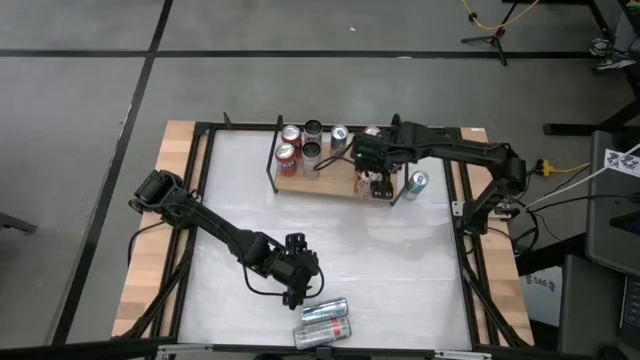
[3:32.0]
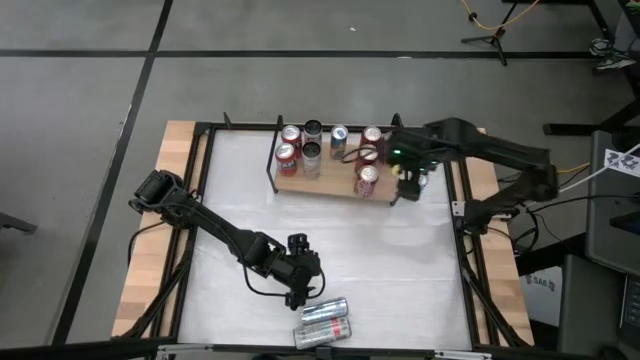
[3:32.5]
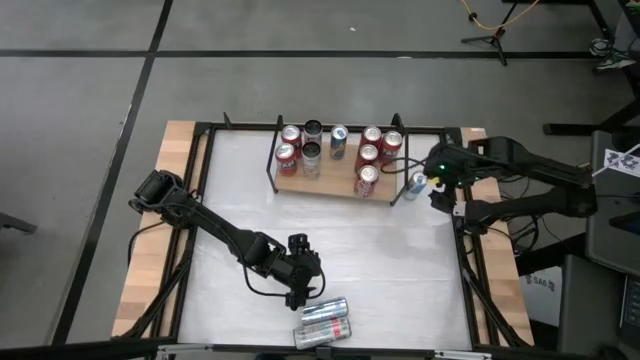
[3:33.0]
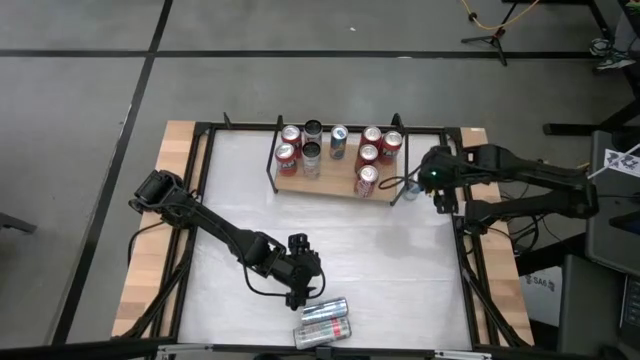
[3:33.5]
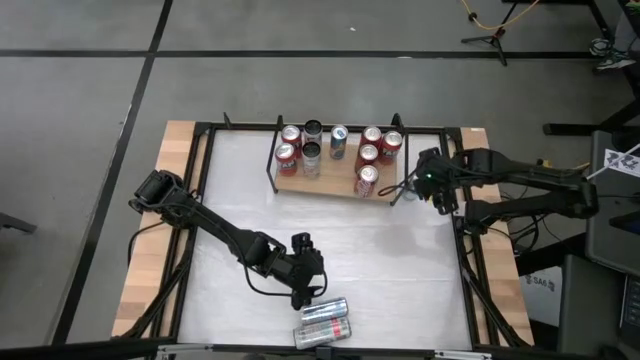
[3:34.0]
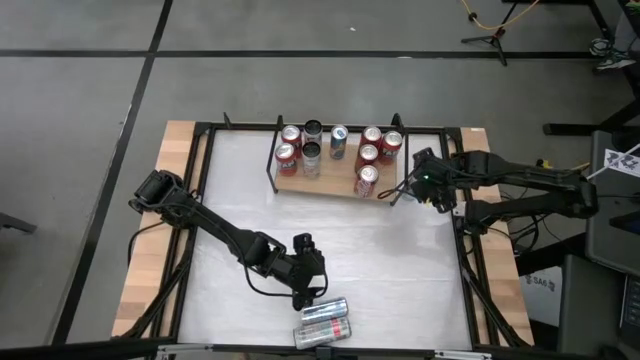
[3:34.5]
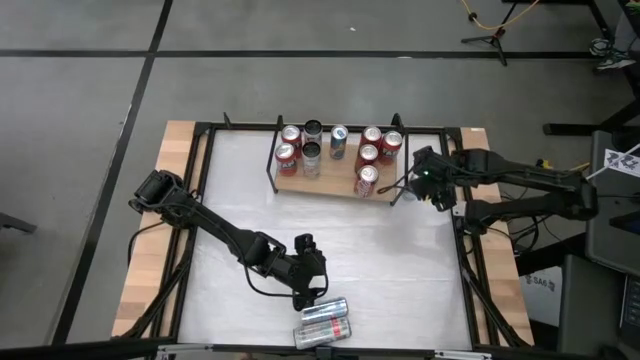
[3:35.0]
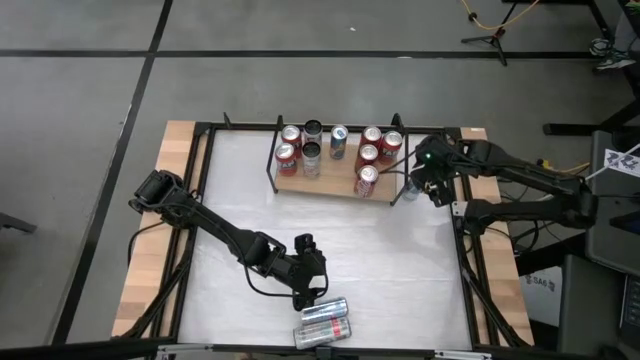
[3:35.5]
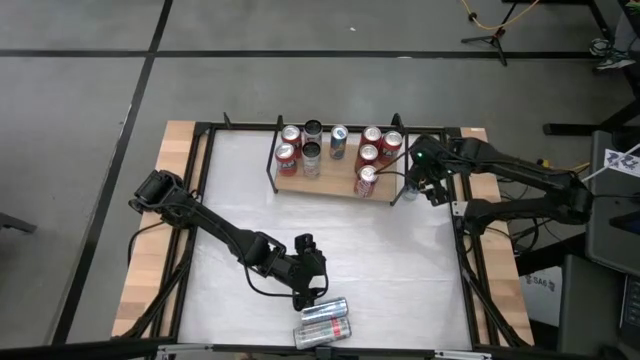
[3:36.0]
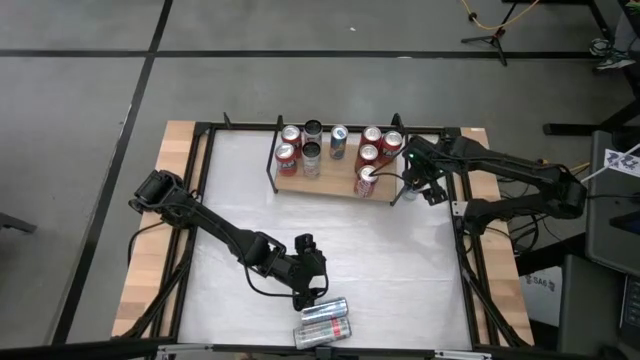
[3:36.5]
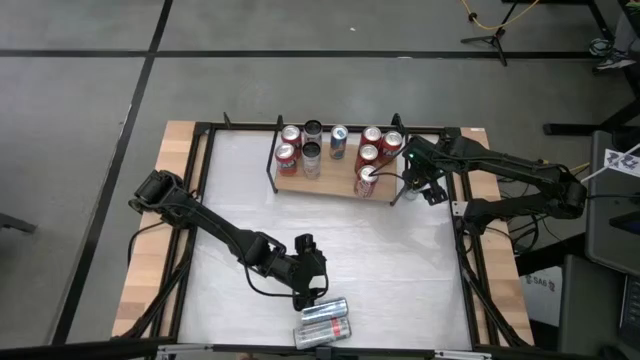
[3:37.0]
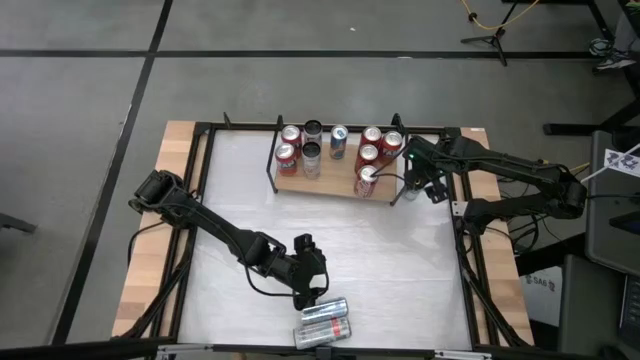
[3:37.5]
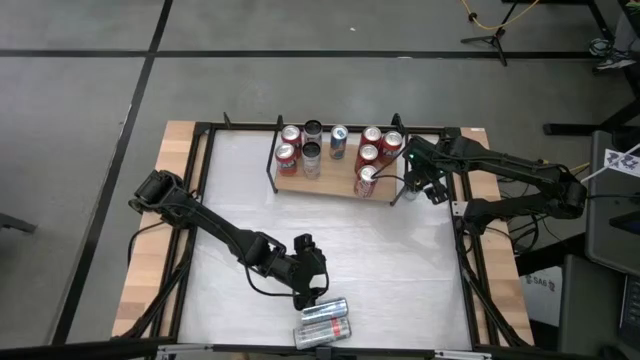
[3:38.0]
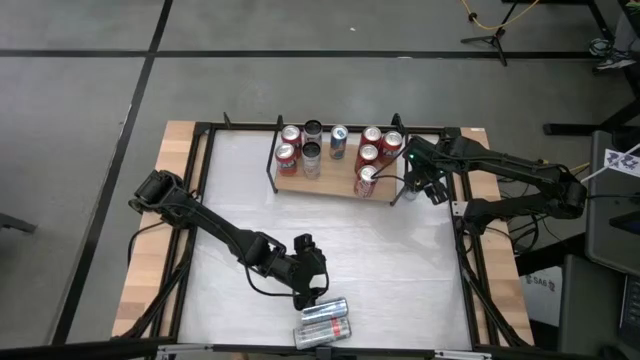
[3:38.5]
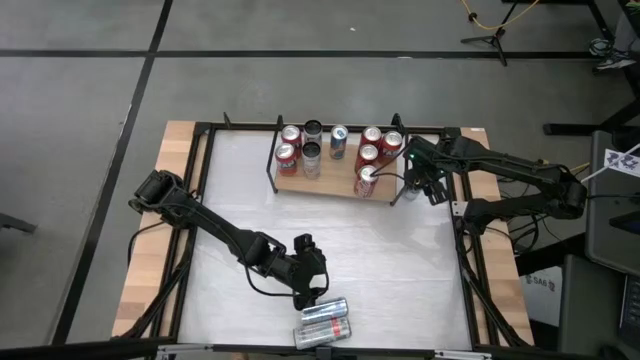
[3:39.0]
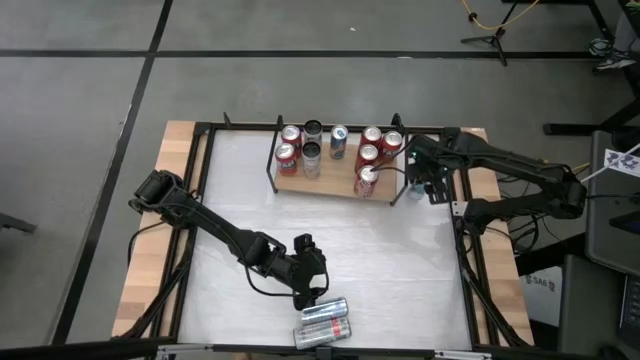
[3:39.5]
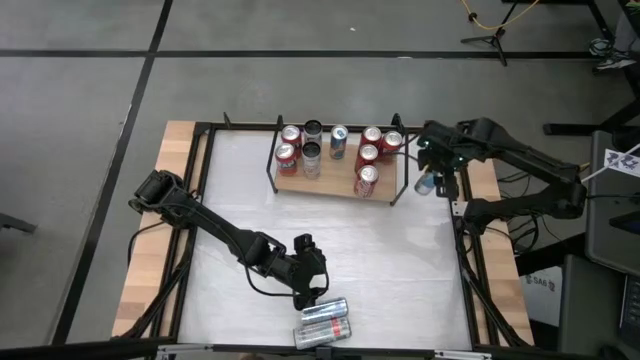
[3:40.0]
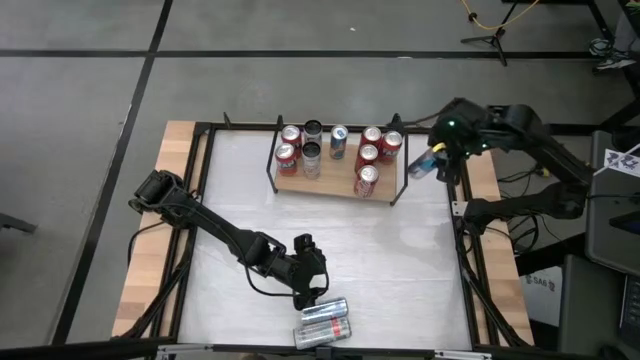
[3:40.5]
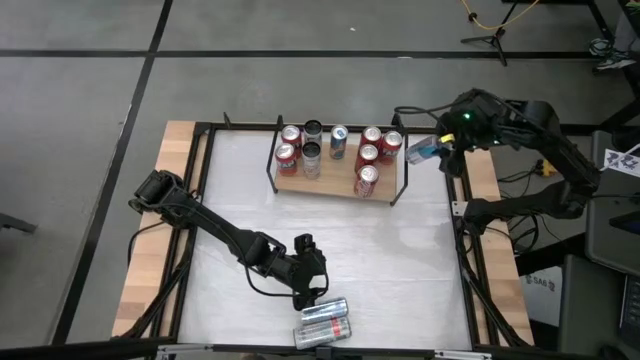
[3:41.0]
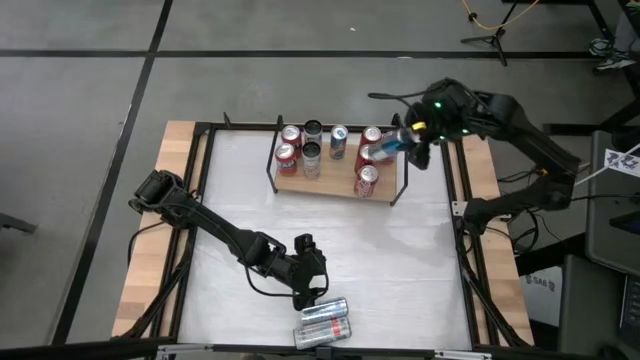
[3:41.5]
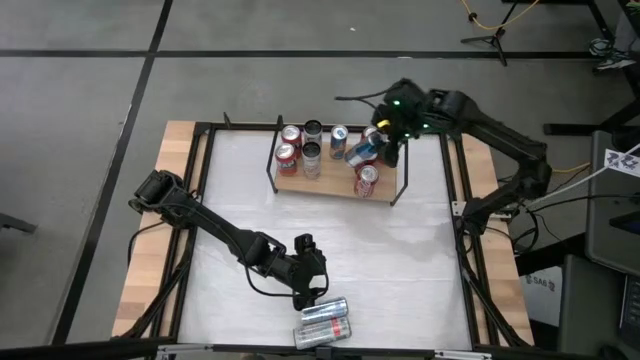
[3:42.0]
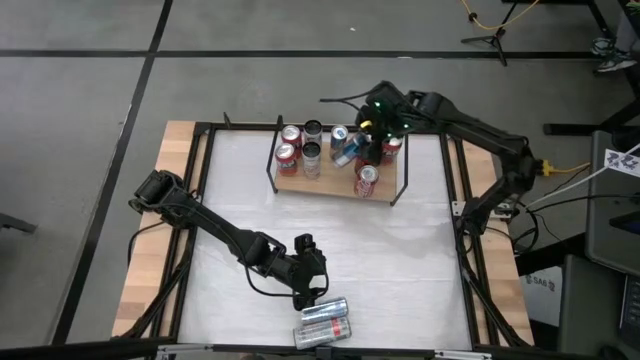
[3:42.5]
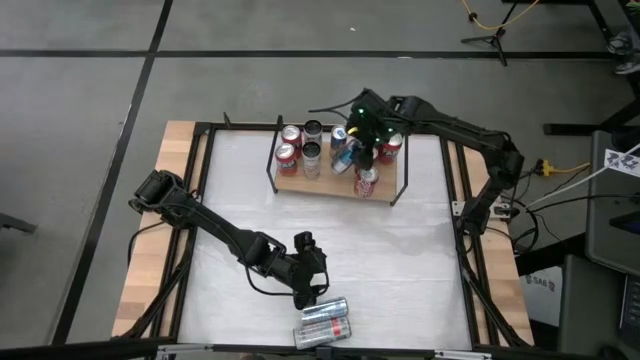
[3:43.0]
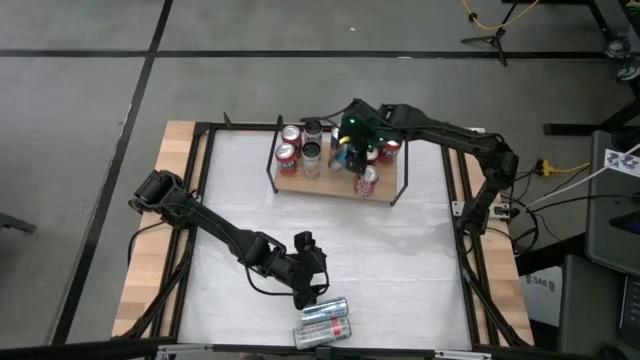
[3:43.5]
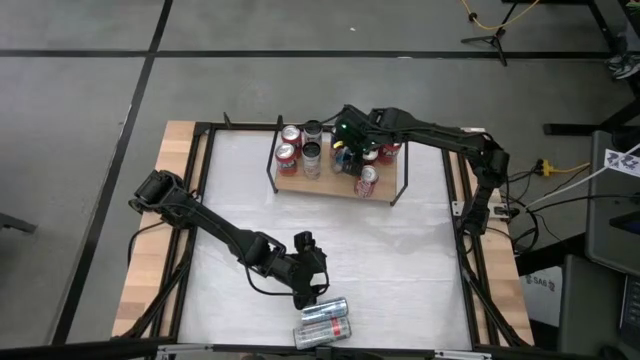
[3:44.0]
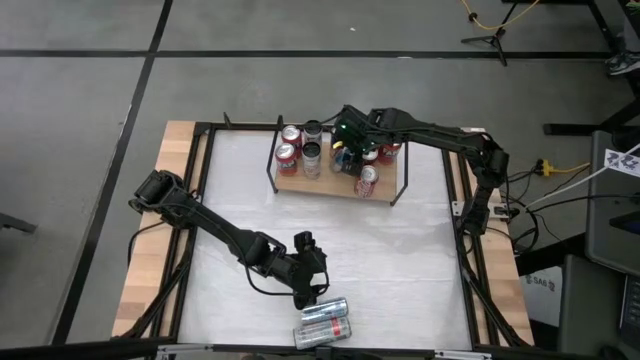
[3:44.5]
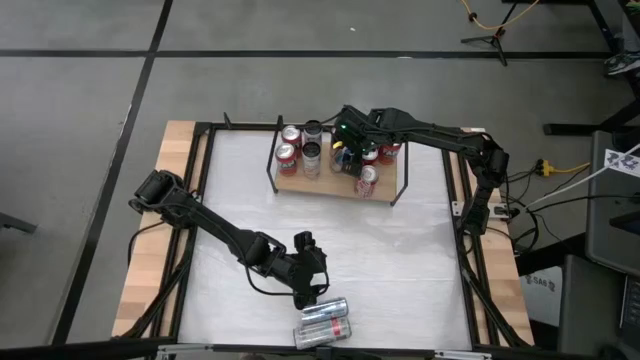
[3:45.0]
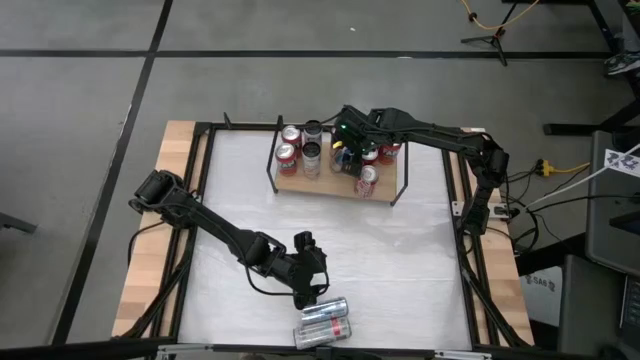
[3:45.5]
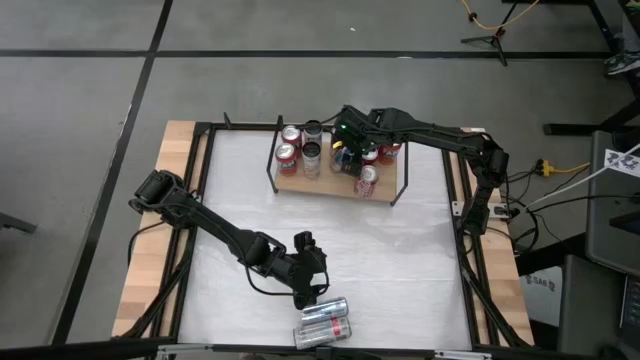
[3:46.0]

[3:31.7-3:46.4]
Task: Place canned beverage on shelf
Put the top blue soda can on the shelf aligned with the blue soda can

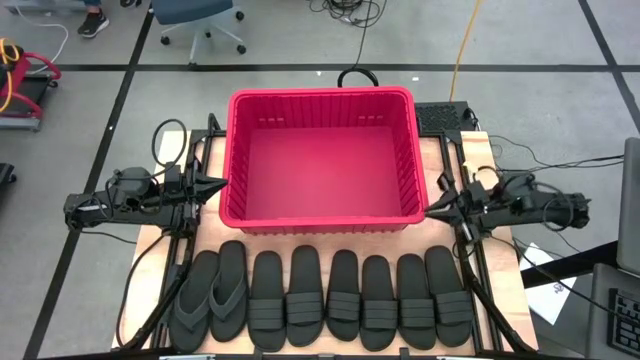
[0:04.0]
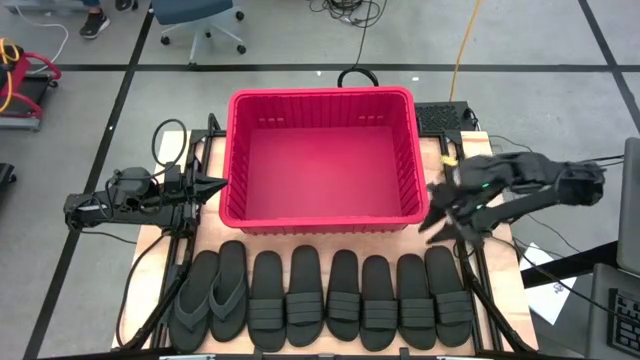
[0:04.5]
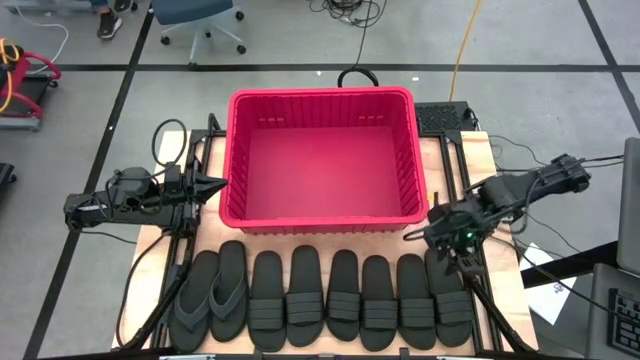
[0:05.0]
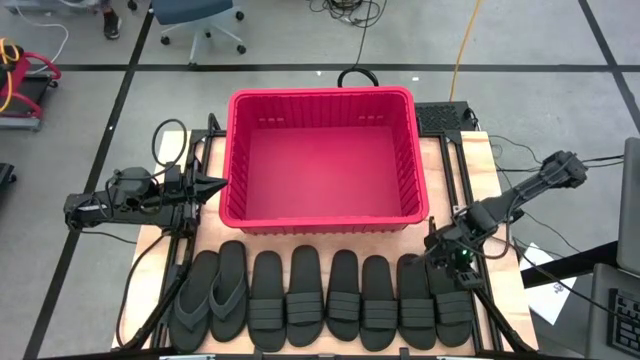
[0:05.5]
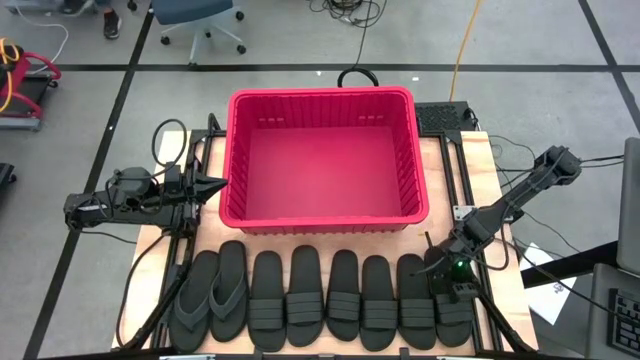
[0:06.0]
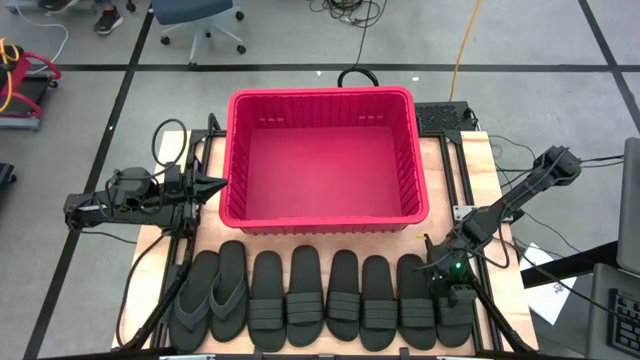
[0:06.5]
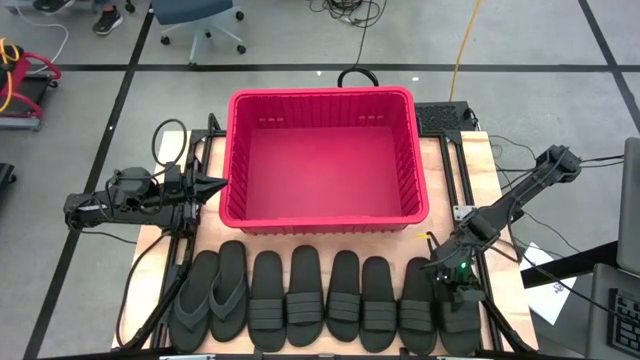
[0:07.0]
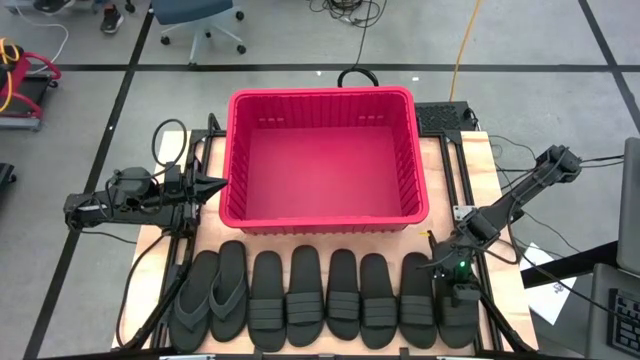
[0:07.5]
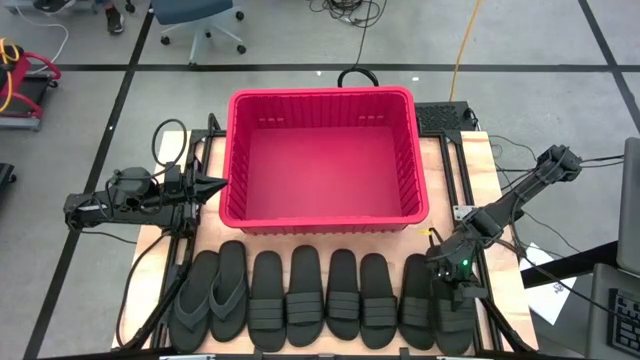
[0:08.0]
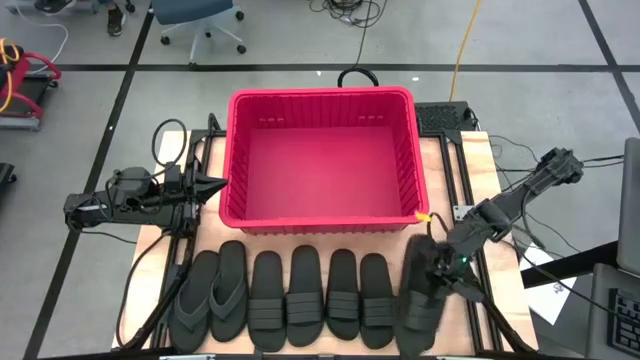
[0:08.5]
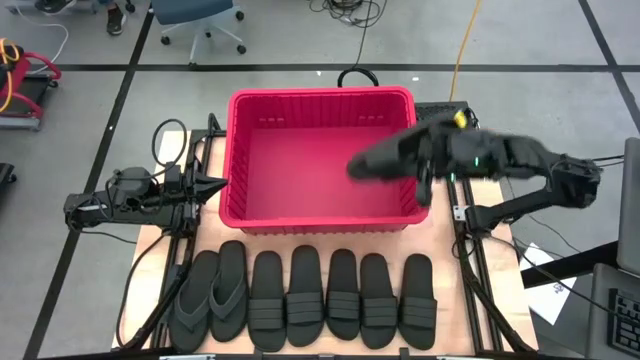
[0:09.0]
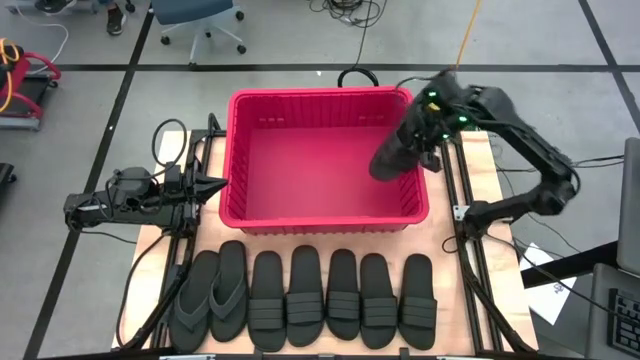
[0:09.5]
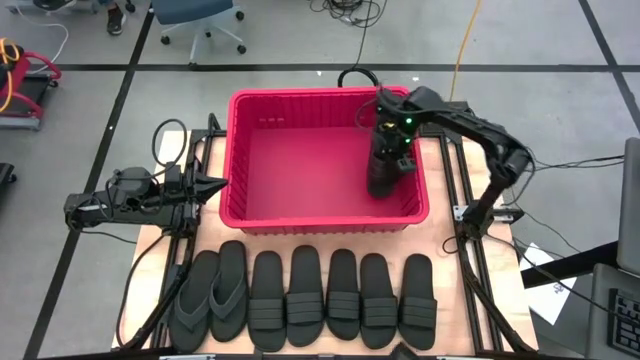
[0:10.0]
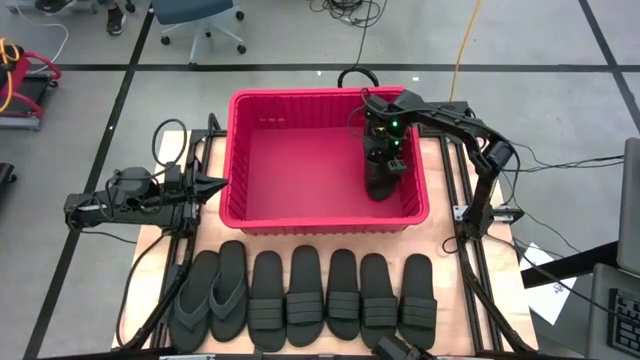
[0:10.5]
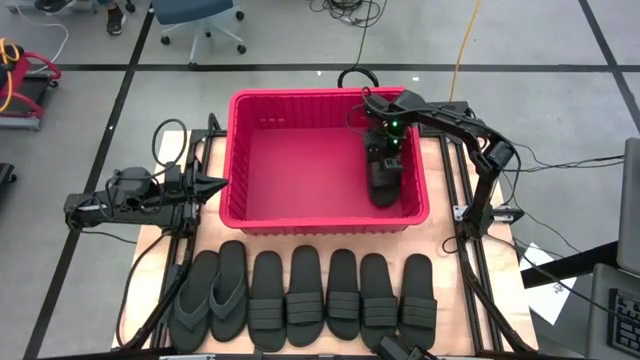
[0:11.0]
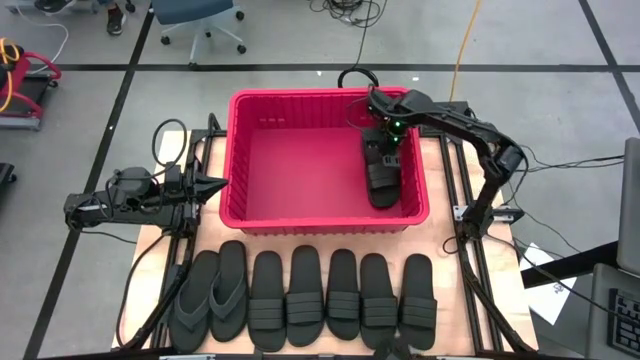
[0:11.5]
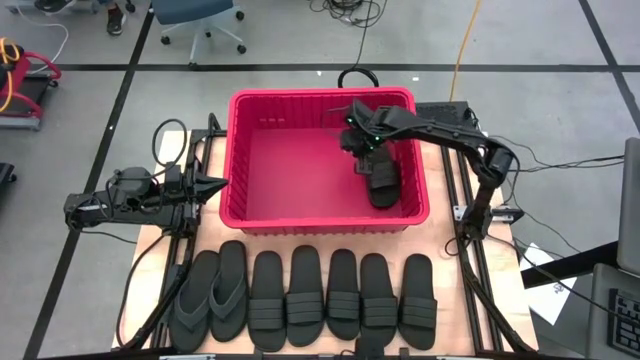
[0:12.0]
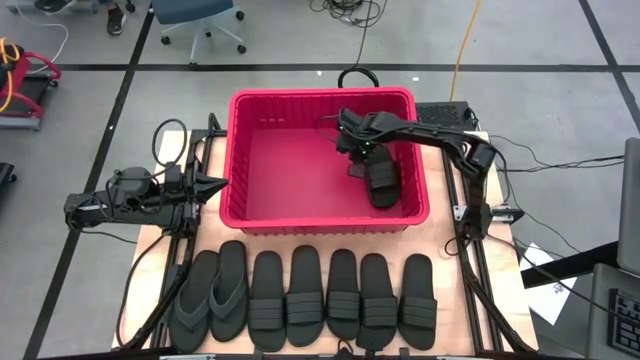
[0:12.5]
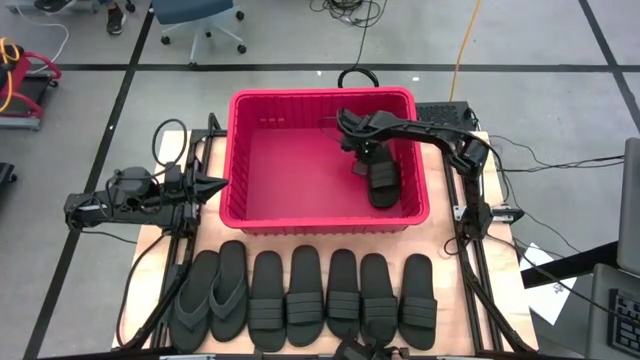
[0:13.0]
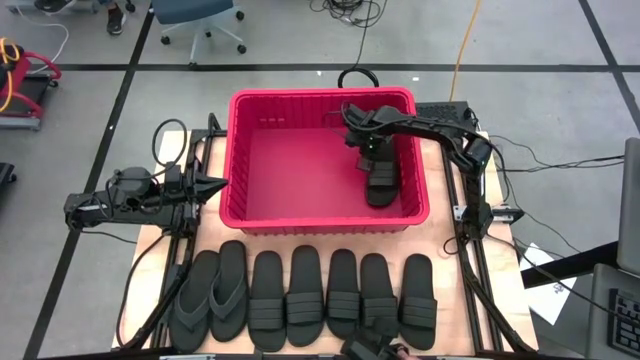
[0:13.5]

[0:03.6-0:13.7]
Task: Pick and place slides into bin
Put the black slide into the red bin
